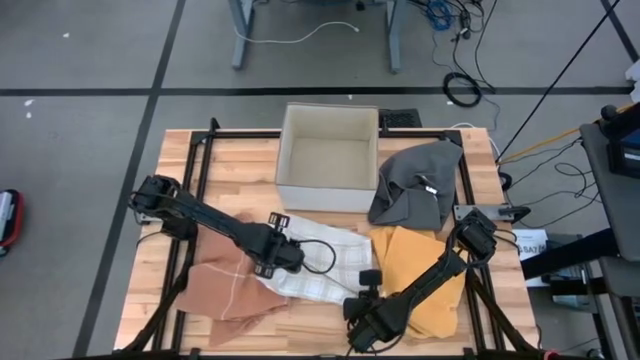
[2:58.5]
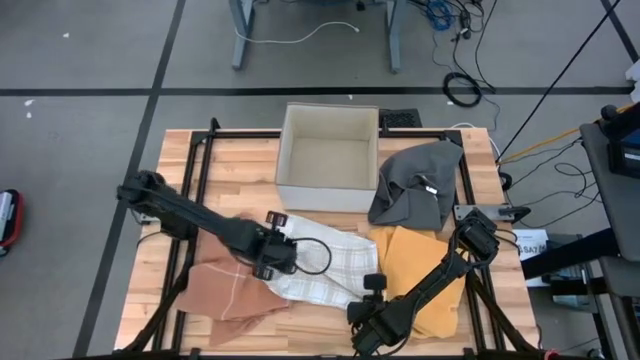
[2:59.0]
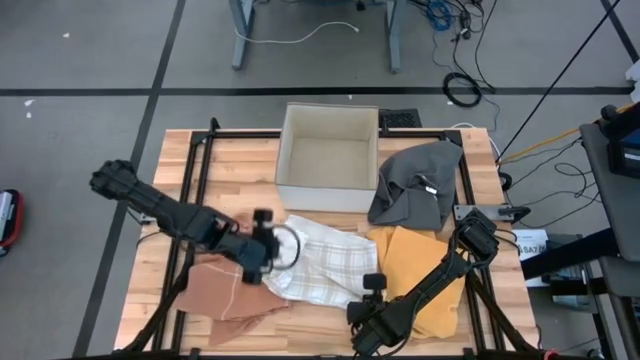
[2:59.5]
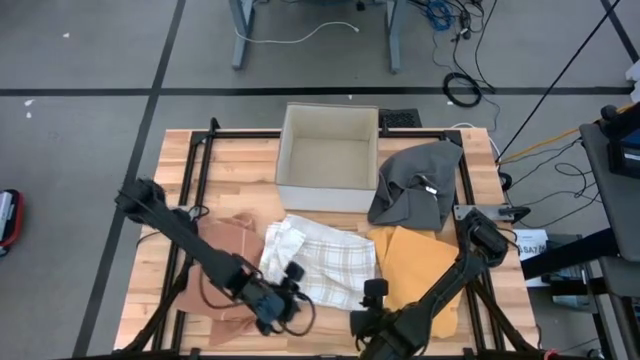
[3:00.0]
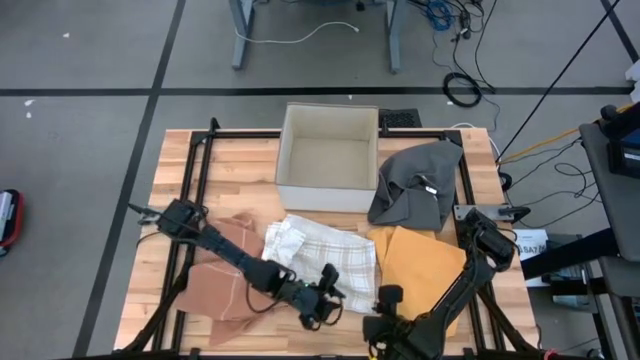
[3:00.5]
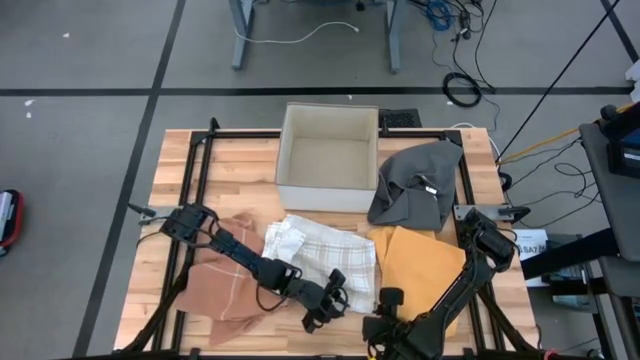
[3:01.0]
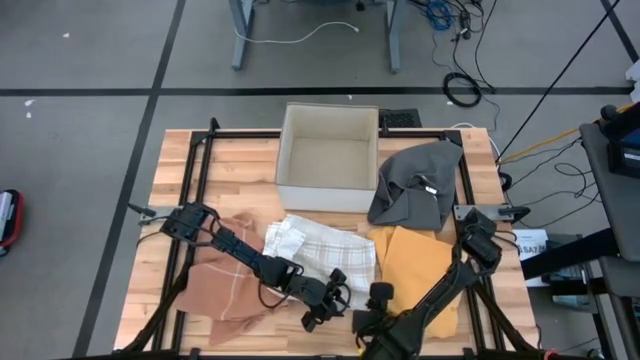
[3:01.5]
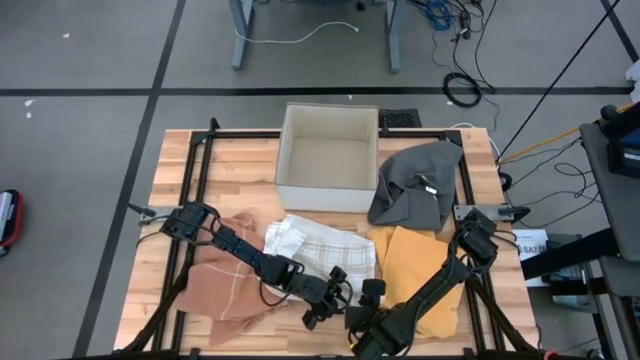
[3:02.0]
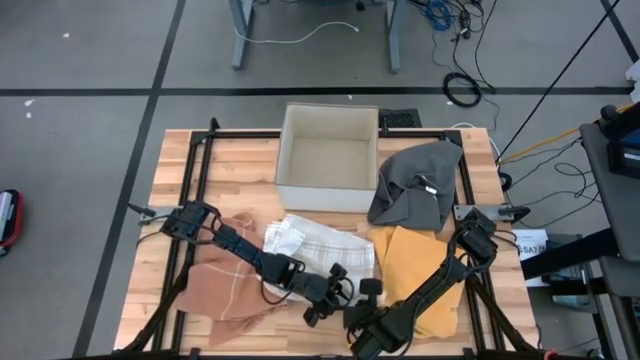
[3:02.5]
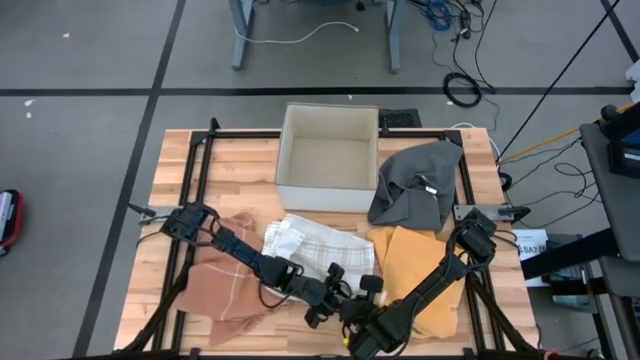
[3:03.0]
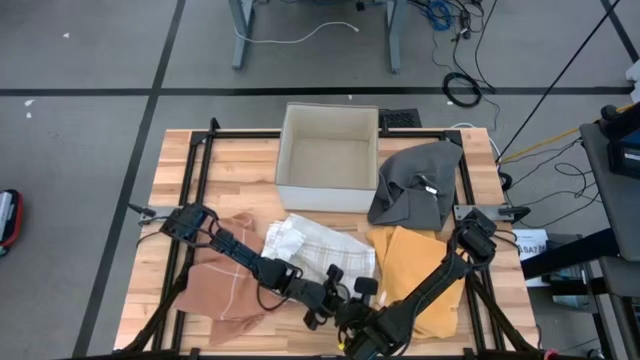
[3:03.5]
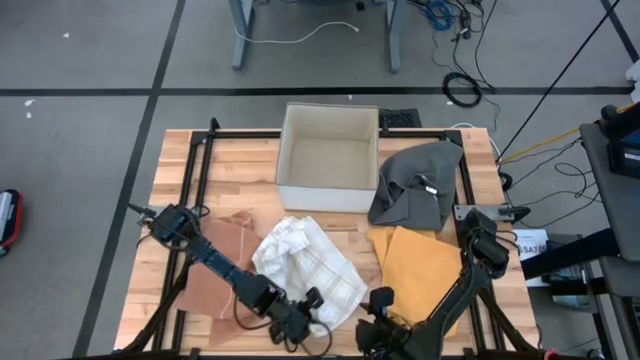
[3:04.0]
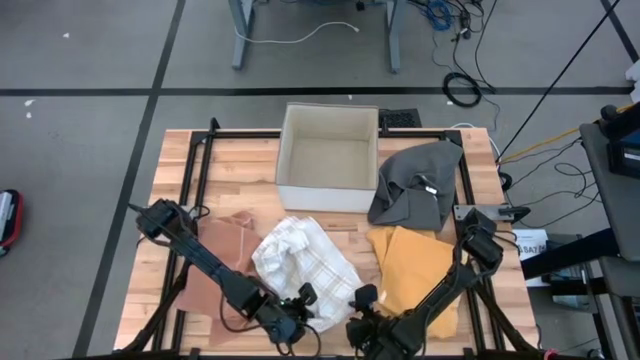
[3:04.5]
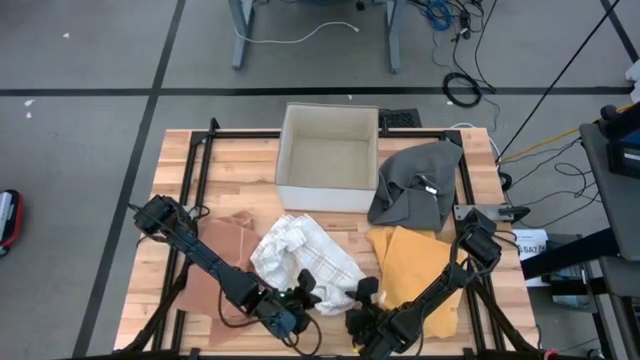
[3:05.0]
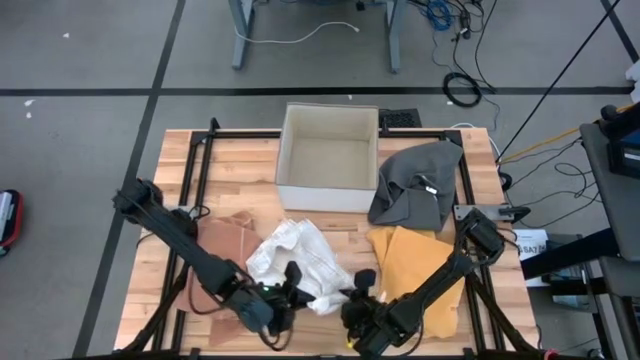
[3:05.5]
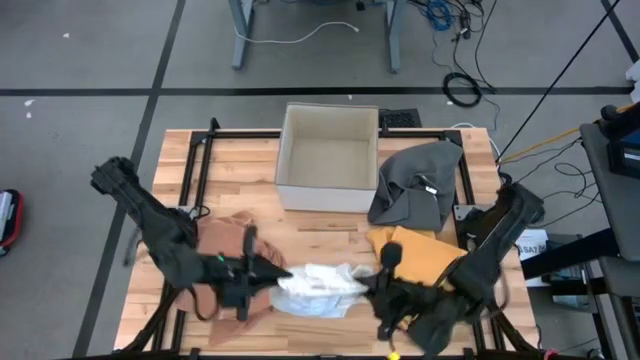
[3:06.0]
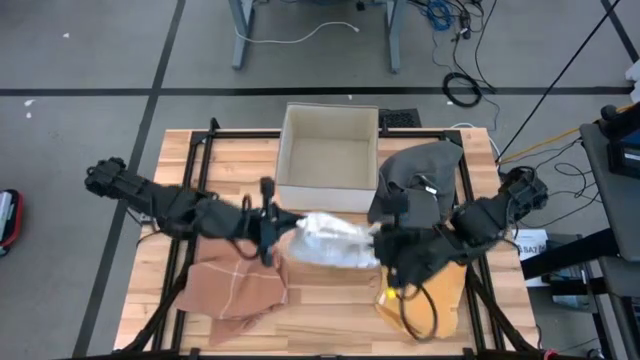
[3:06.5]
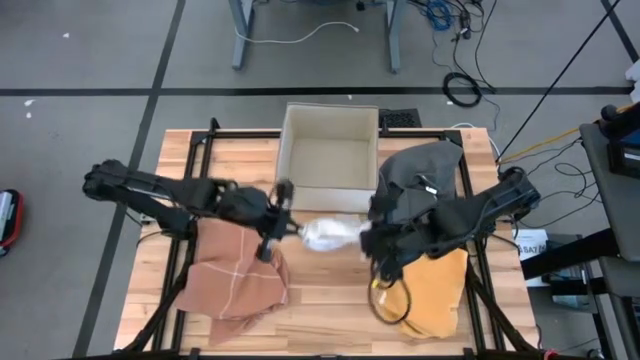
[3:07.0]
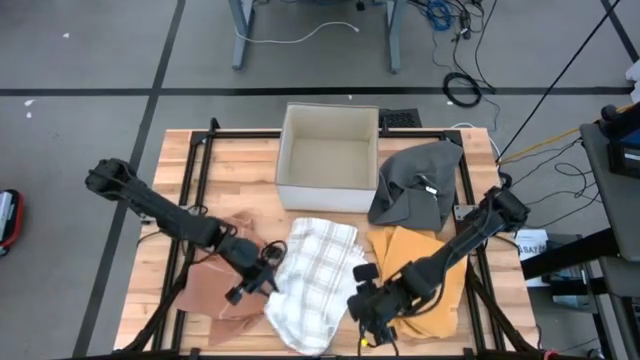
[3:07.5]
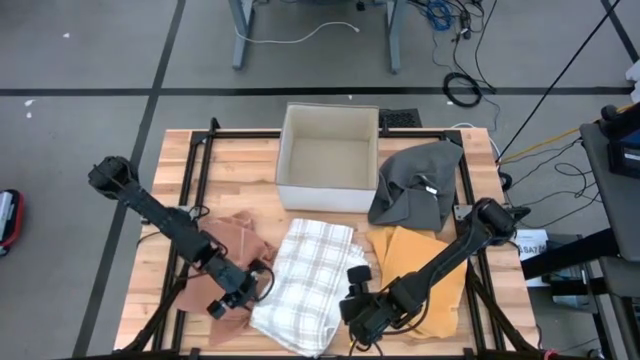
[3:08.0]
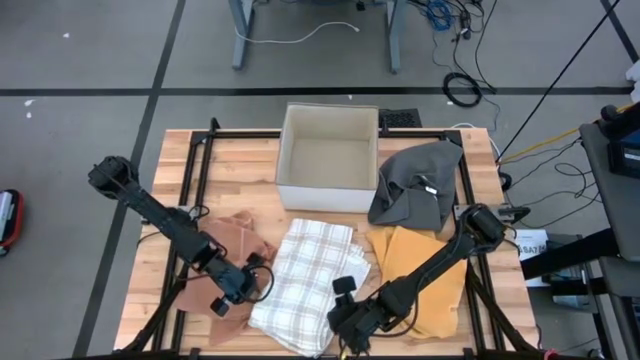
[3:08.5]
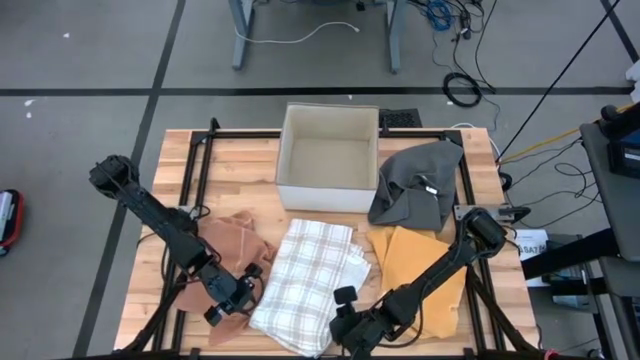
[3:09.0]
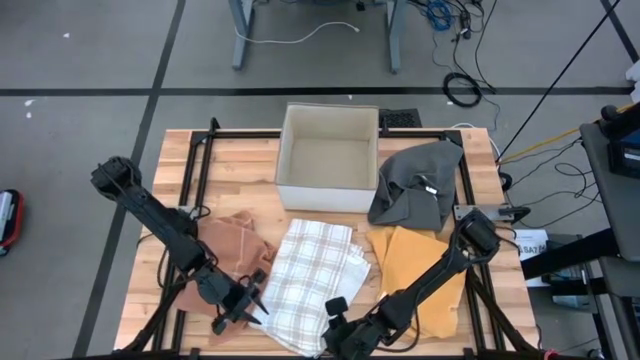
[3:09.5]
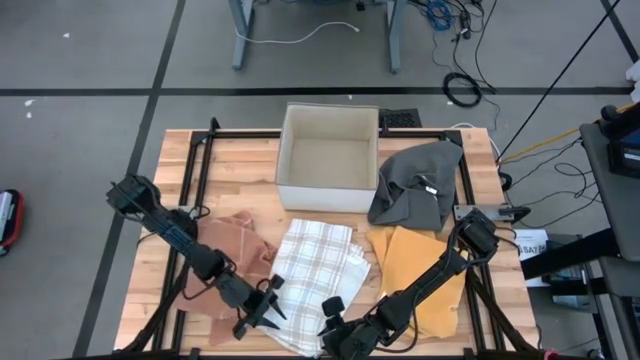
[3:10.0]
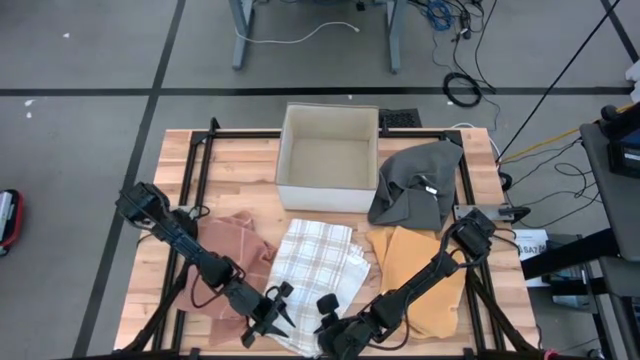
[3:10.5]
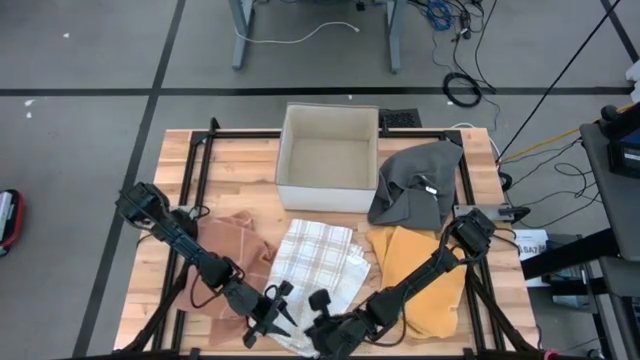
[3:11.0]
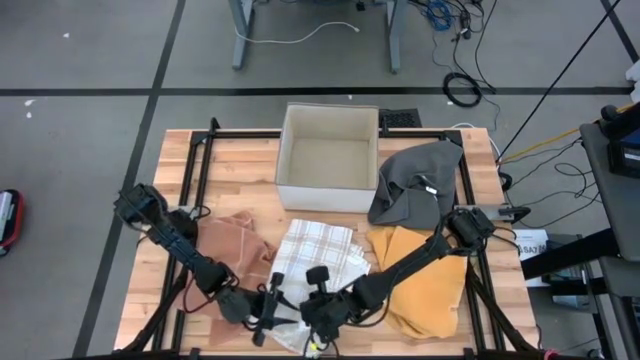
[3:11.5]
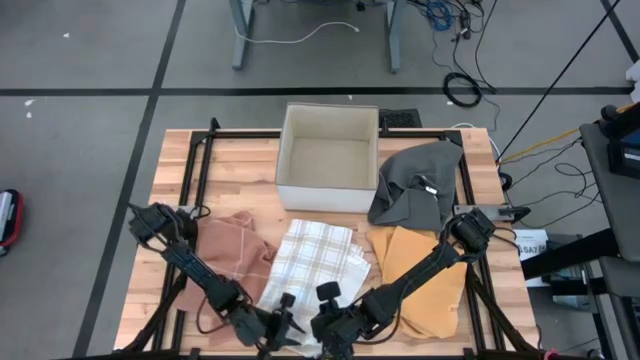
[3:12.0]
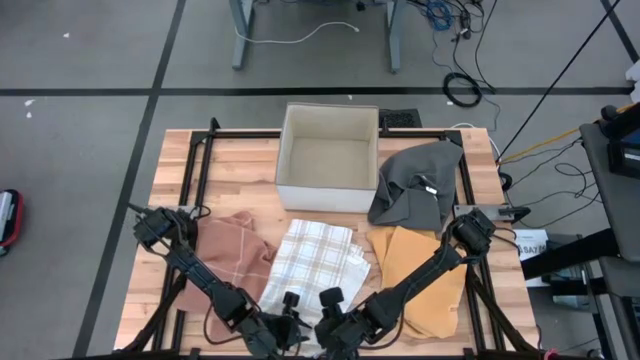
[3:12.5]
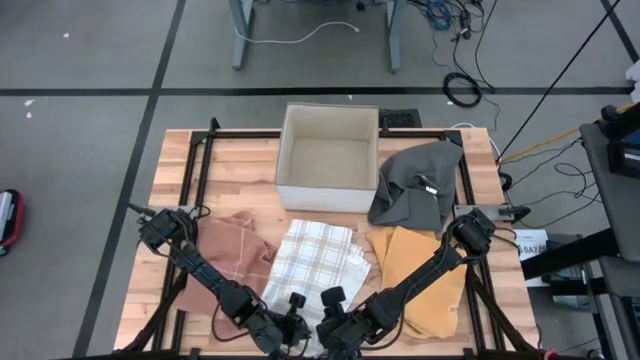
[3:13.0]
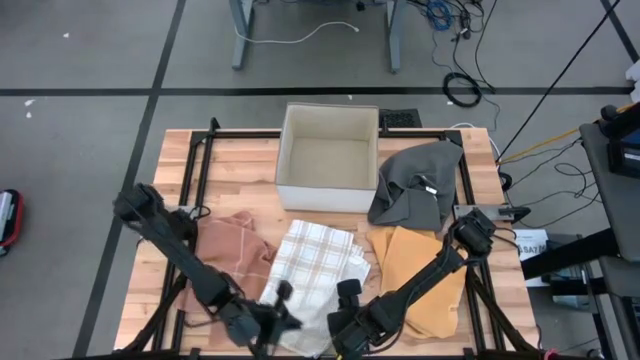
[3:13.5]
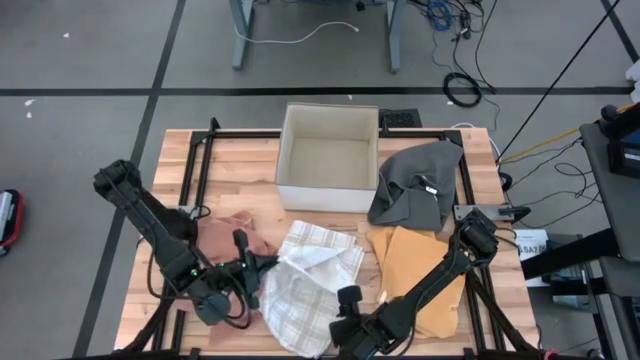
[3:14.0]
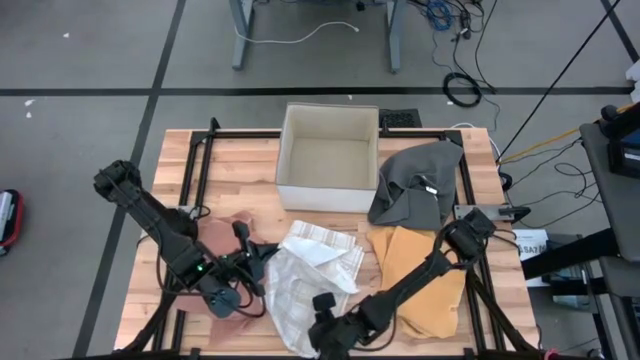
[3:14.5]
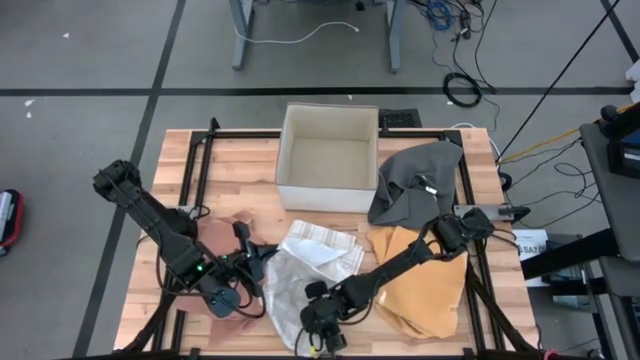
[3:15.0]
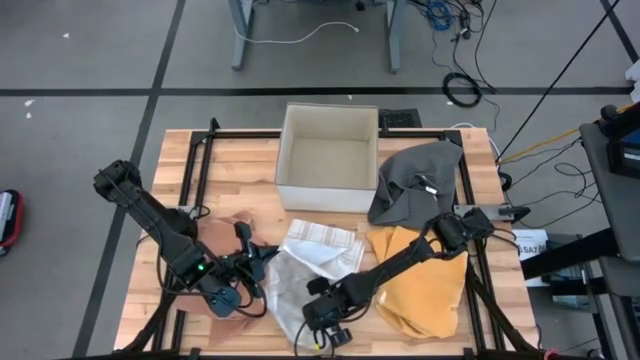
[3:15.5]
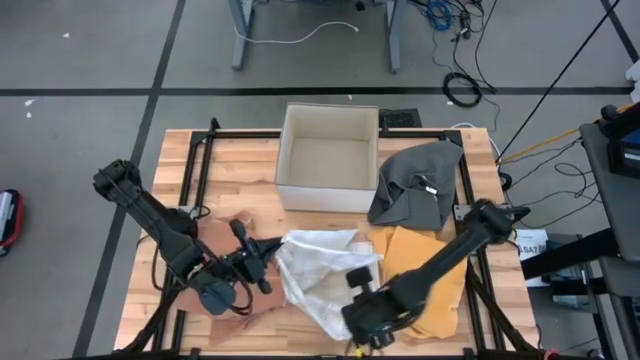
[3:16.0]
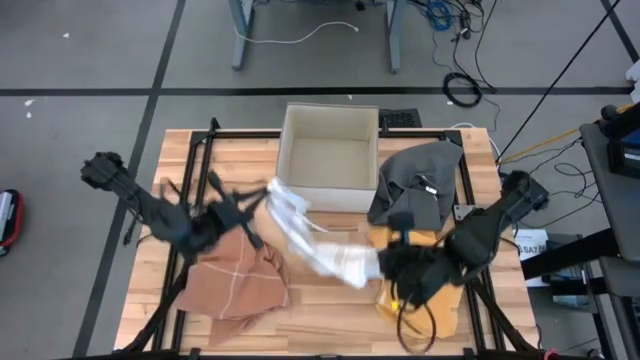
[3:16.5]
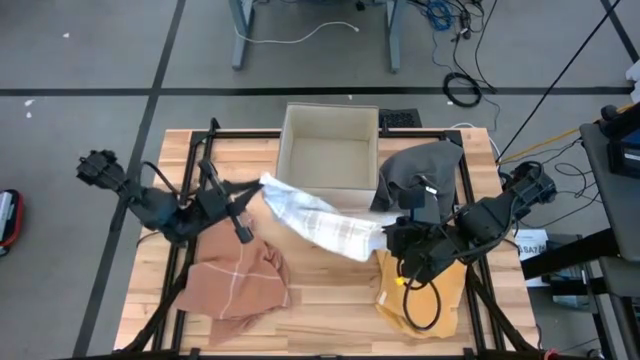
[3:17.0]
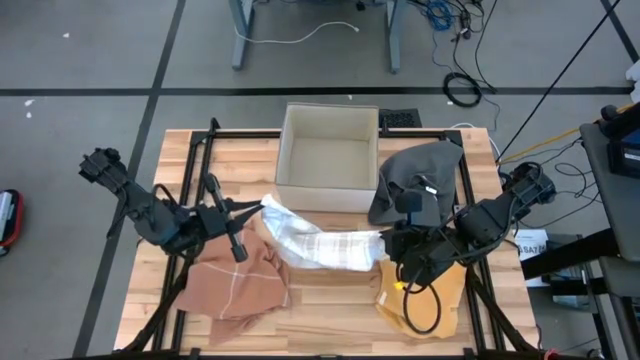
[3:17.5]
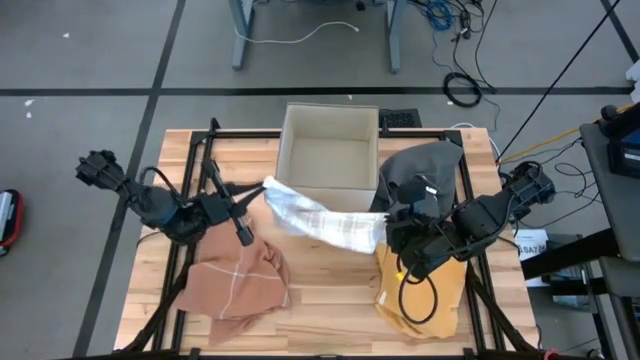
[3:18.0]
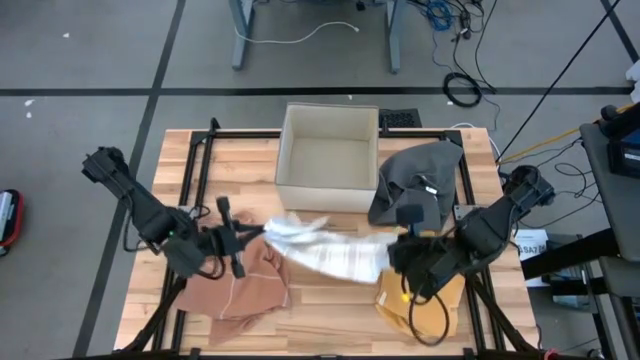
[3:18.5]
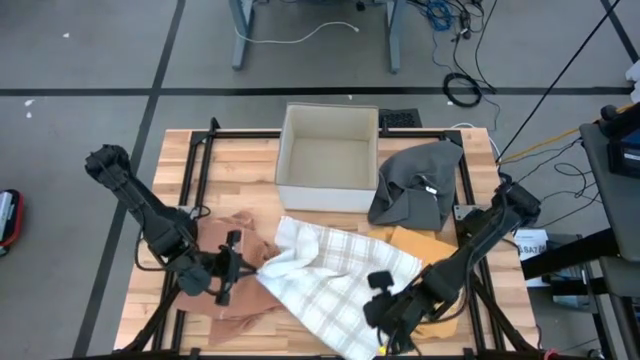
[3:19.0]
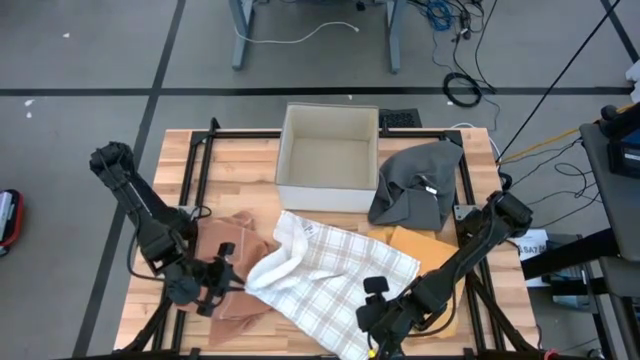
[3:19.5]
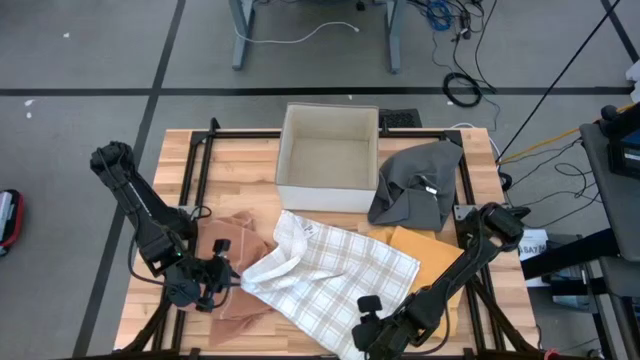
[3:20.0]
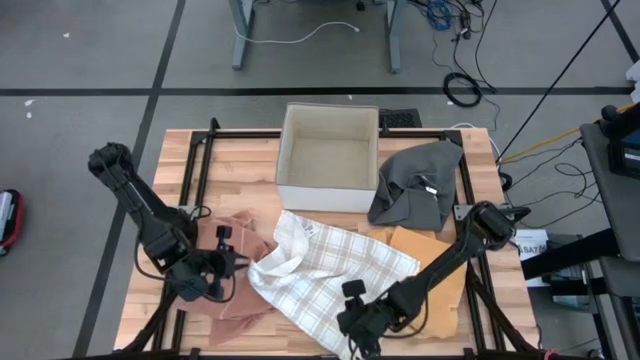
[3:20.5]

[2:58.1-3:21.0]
Task: Fold towel
Fold the white patterned towel
